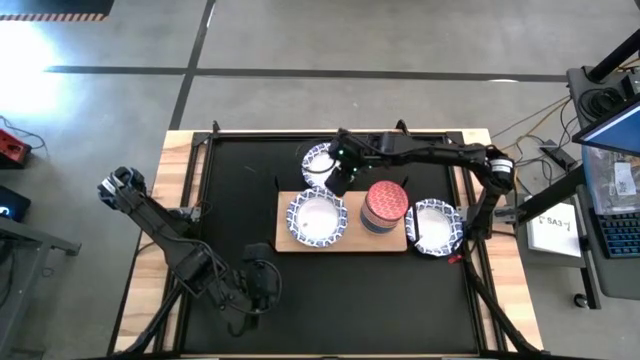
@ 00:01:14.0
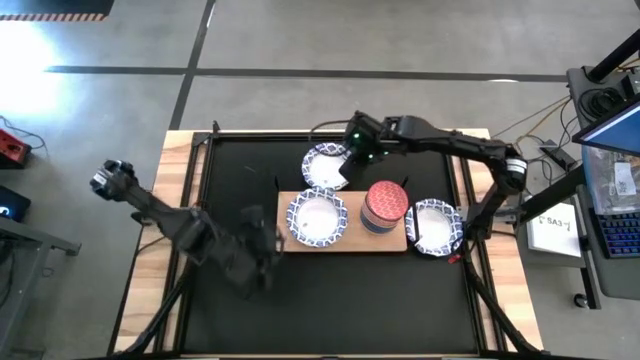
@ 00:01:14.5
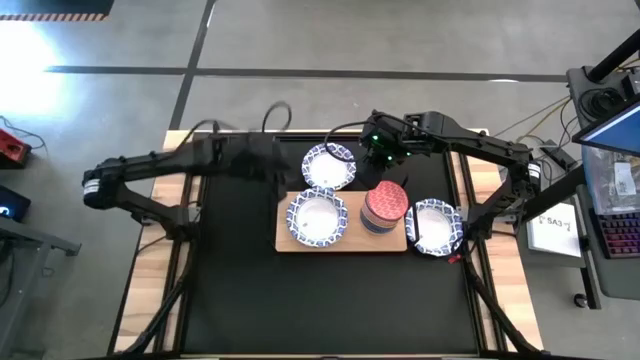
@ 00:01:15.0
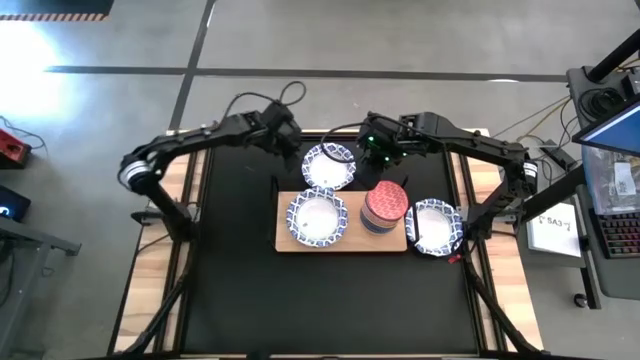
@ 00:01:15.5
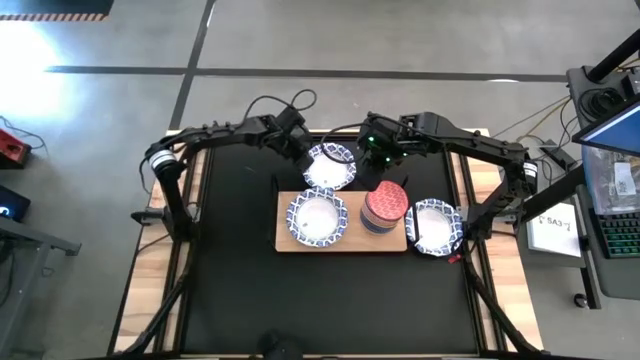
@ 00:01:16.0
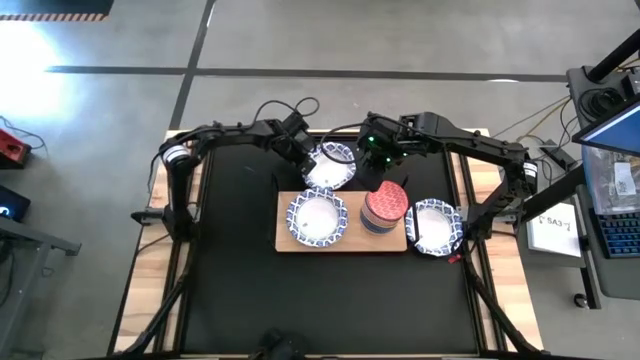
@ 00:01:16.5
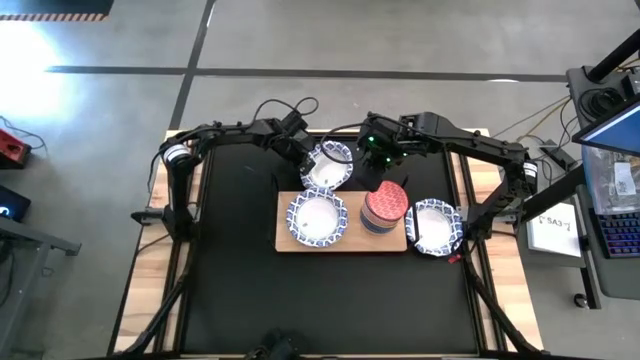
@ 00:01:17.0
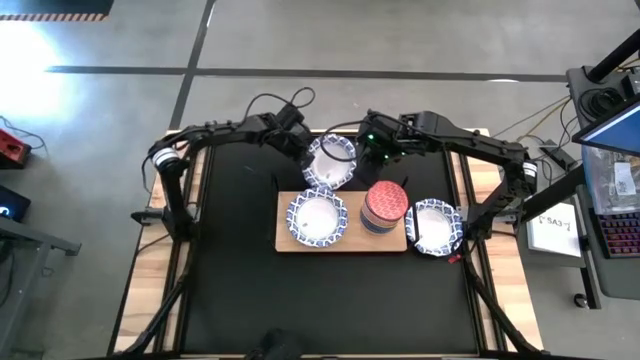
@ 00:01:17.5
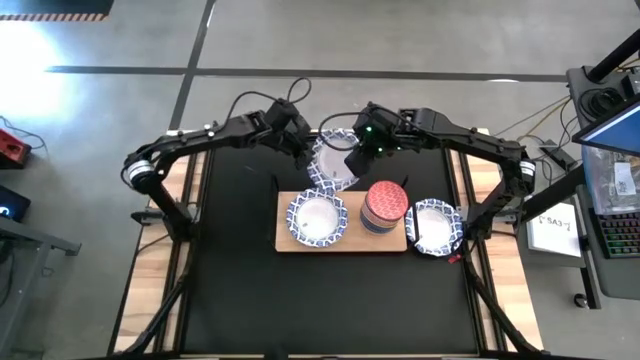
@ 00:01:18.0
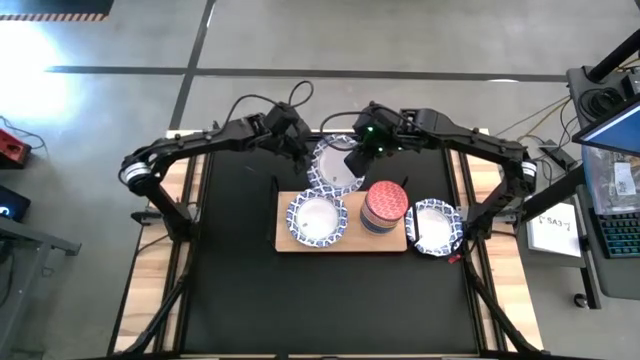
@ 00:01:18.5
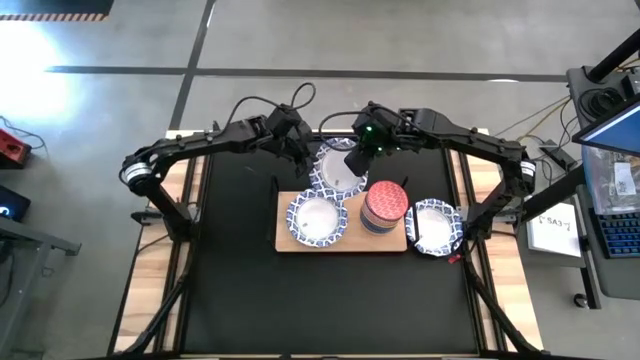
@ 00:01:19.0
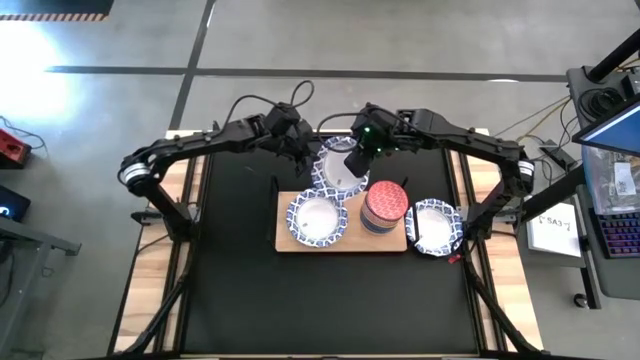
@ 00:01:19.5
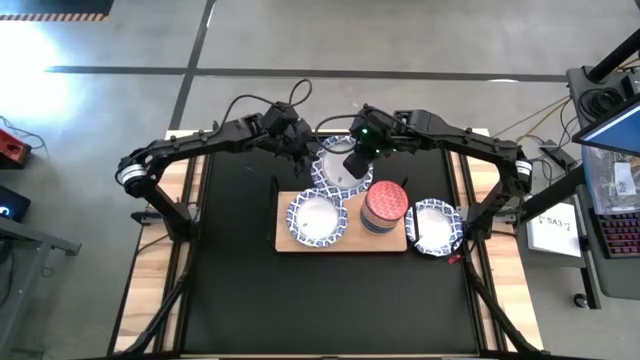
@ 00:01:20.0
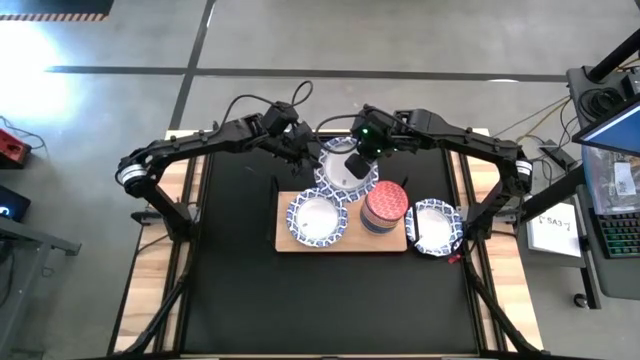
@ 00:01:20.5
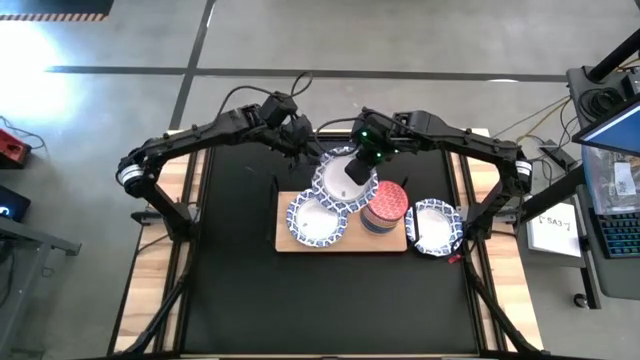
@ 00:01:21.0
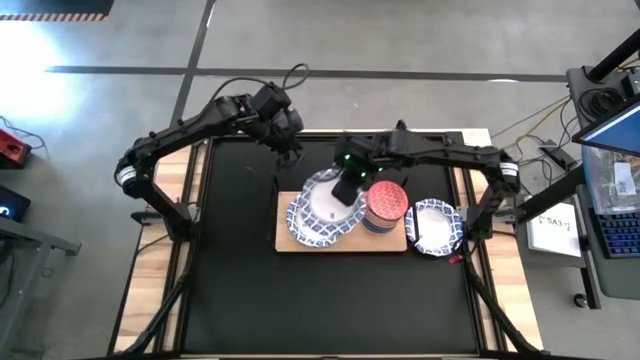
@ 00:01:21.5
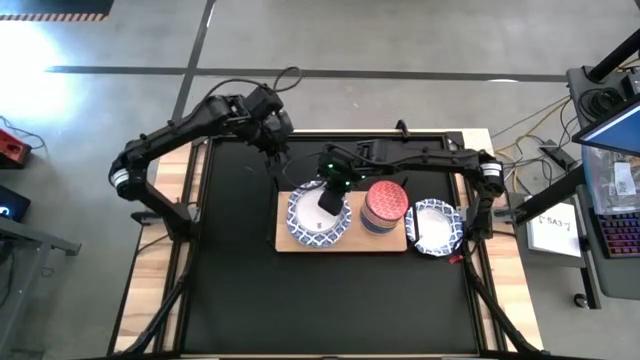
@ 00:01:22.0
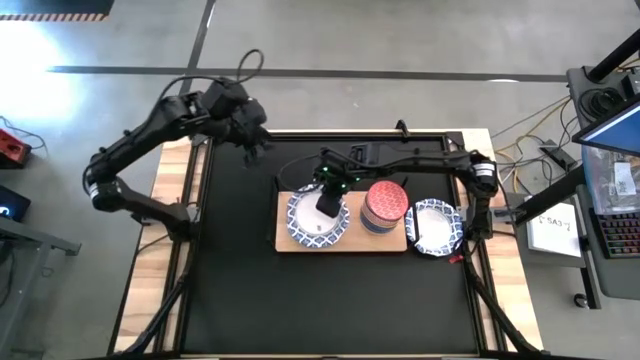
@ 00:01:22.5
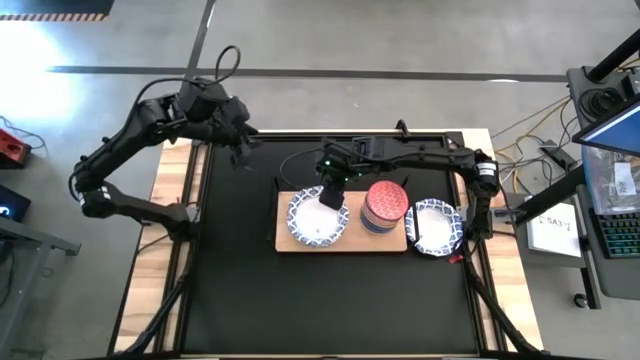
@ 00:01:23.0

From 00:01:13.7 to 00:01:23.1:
Task: Place and stack bowls onto a shelf
Stack the big white and blue patterned bowl on top of the big white and blue patterned bowl

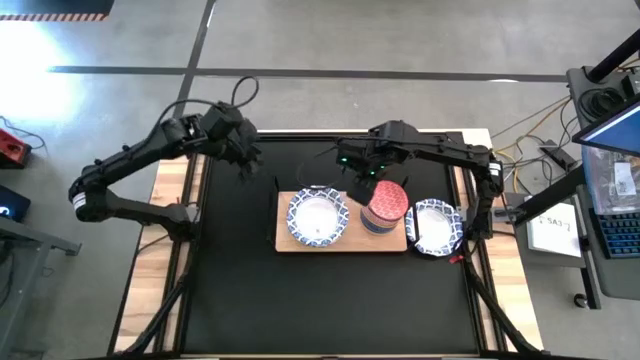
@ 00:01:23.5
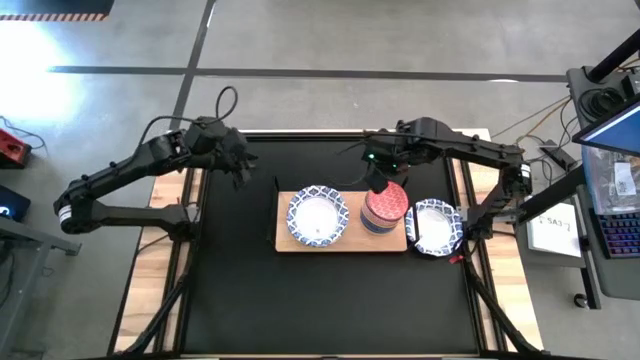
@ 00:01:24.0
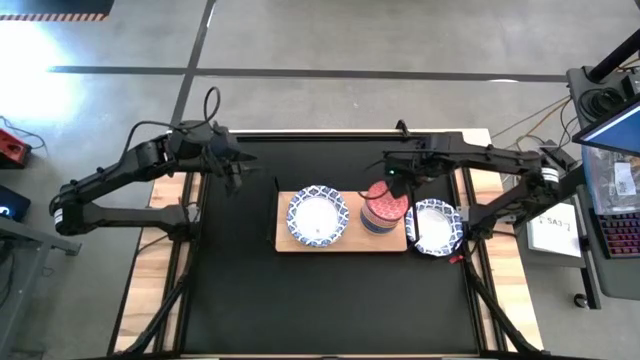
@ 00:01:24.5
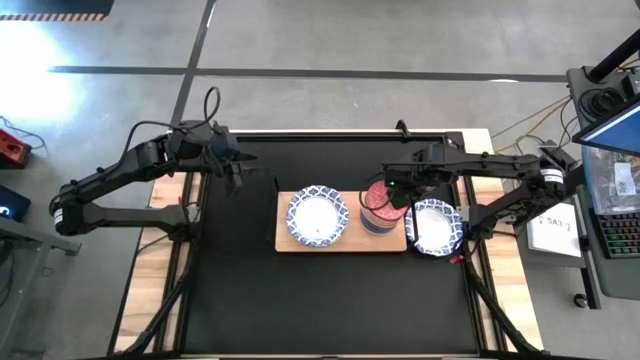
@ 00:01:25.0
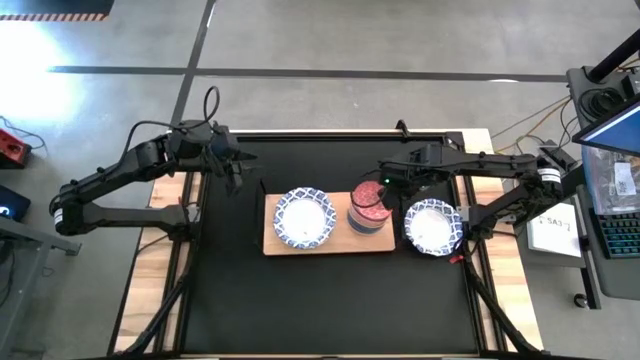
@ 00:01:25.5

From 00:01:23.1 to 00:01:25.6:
Adjust the shelf

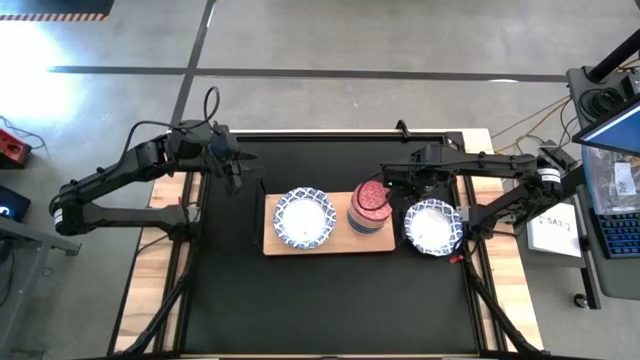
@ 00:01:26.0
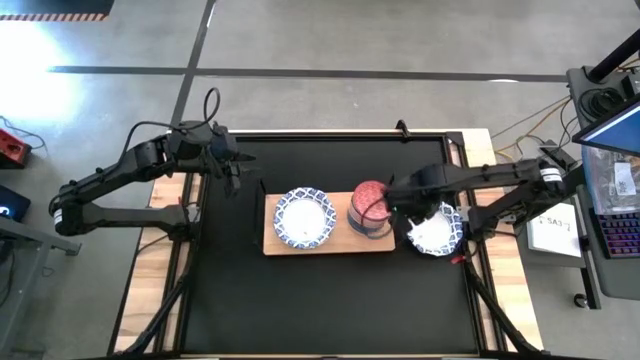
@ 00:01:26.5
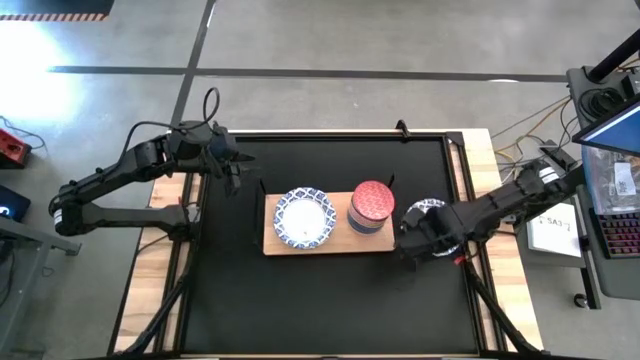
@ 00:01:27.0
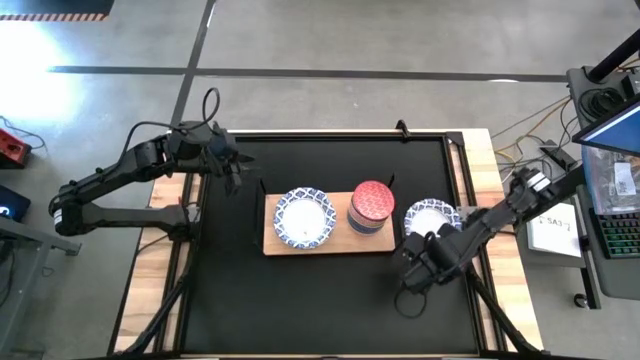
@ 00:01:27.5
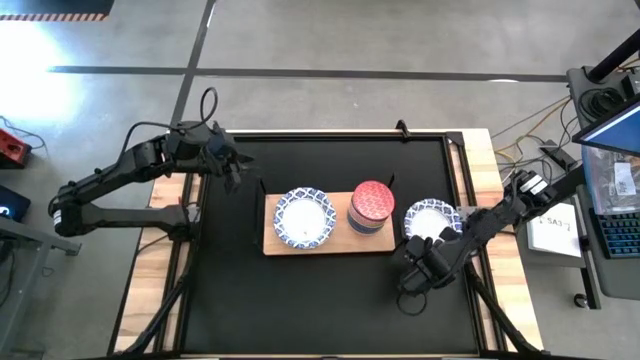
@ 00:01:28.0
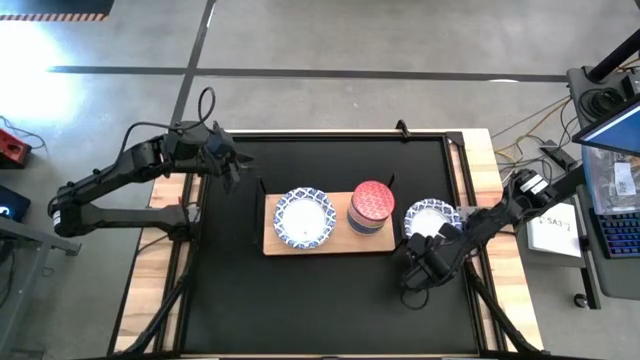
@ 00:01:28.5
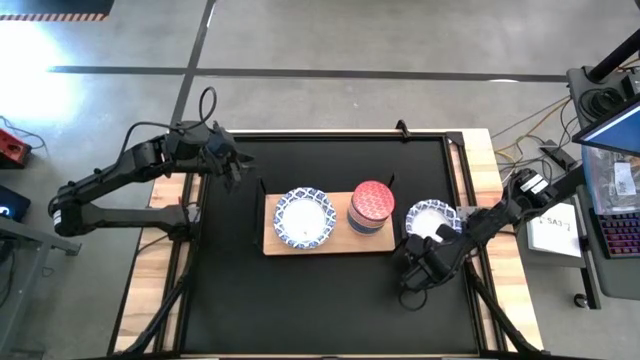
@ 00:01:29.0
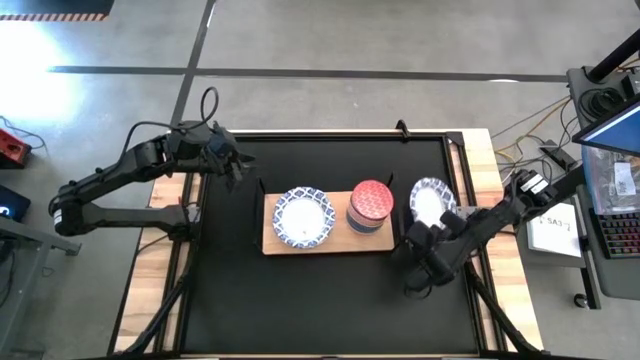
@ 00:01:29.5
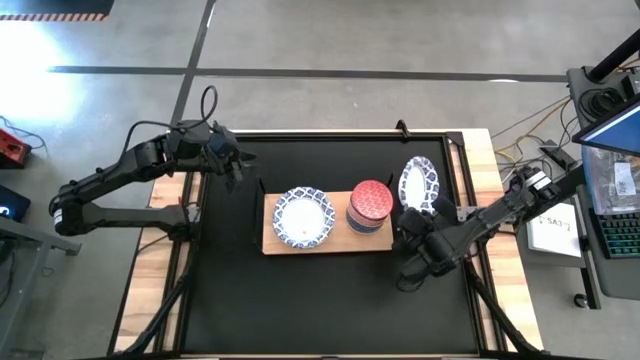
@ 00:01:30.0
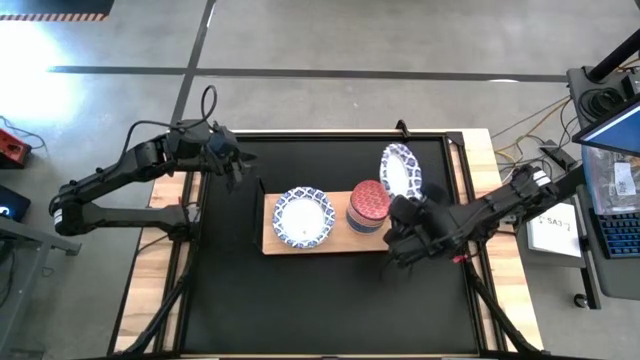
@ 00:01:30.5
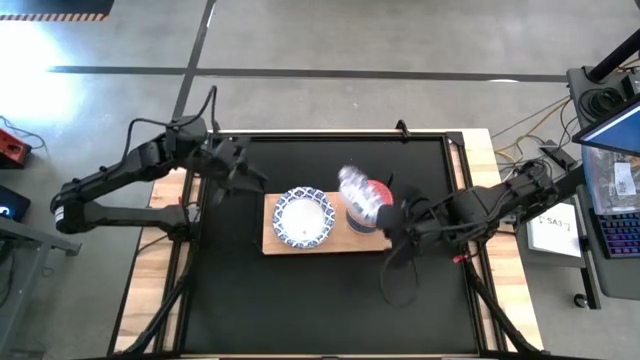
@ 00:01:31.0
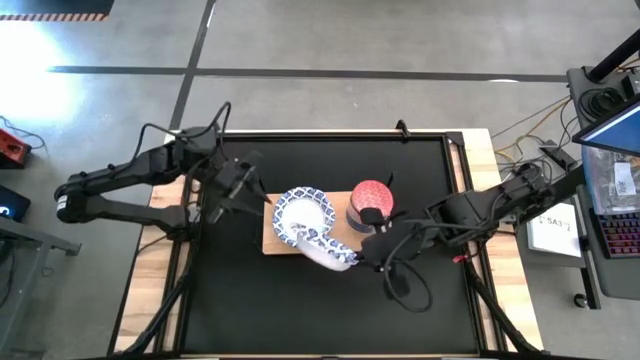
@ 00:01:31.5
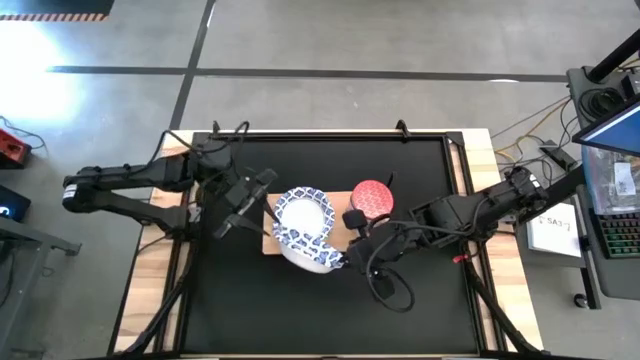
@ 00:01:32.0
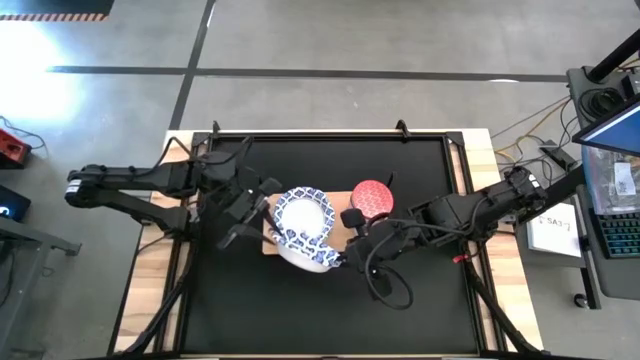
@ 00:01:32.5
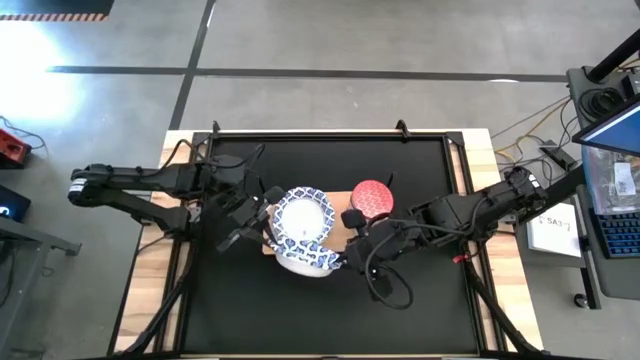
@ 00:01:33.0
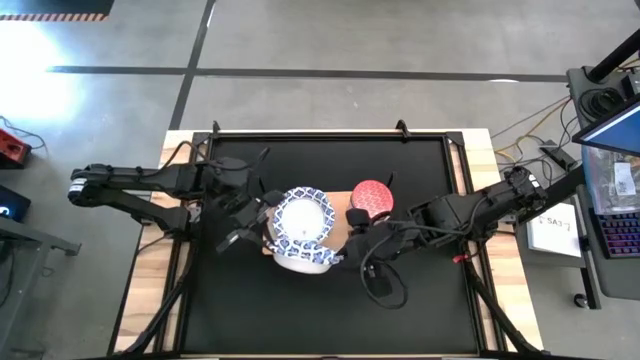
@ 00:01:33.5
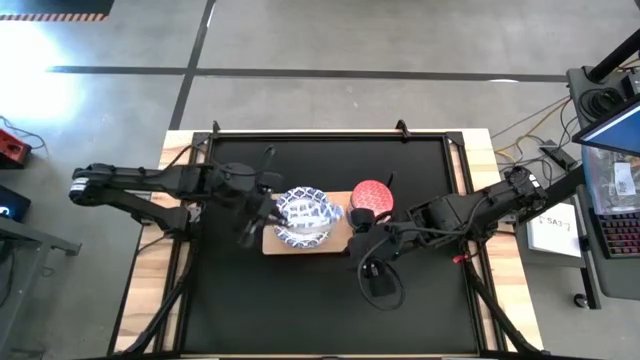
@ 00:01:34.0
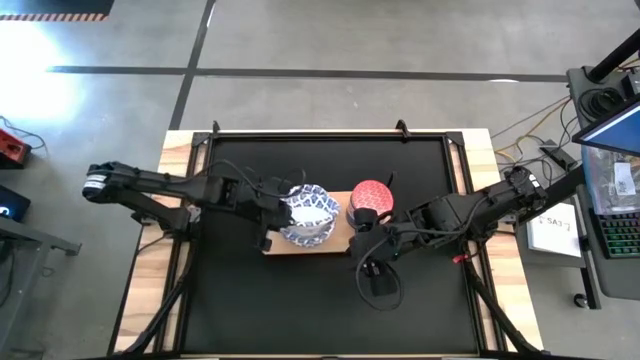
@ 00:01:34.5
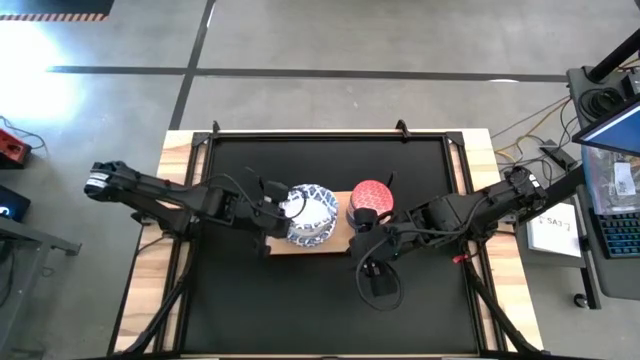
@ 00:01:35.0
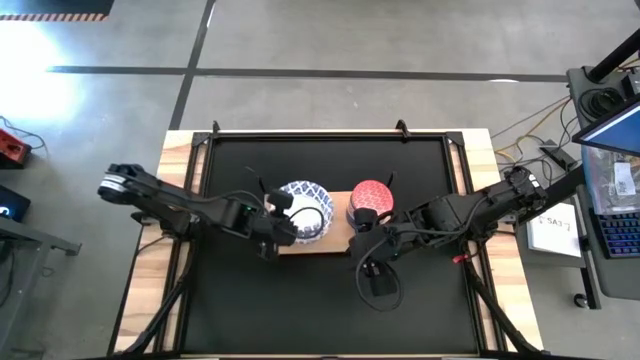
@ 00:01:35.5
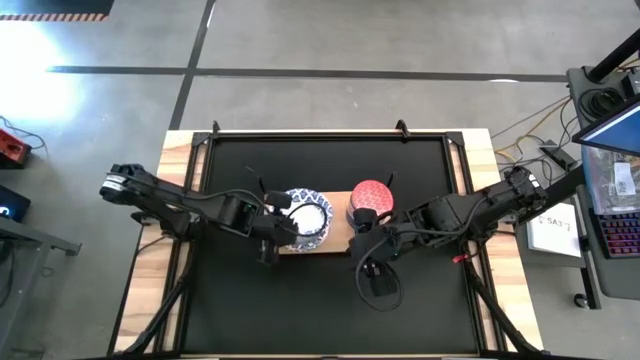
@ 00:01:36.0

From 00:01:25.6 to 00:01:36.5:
Stack the big white and blue patterned bowl on top of the big white and blue patterned bowl
